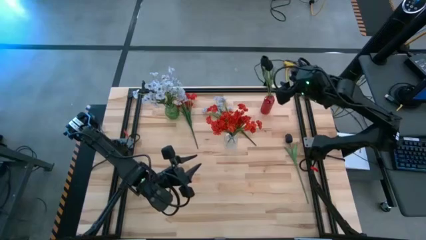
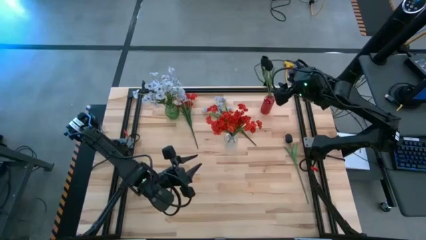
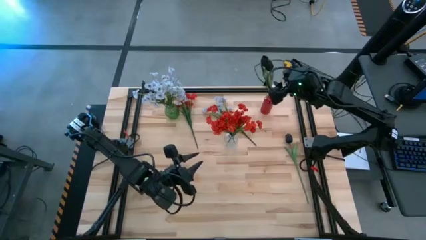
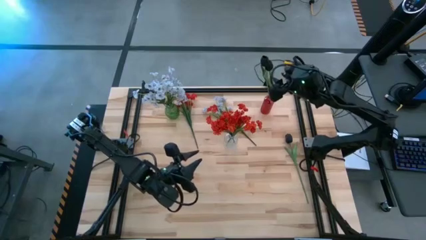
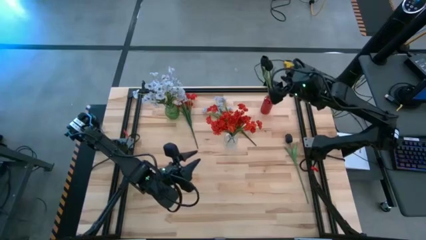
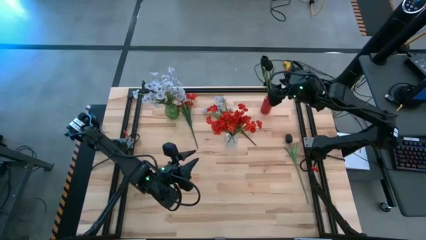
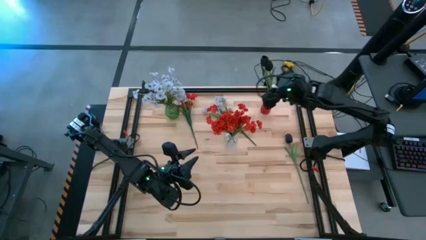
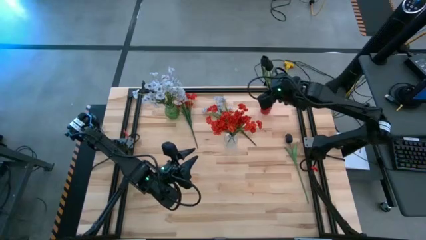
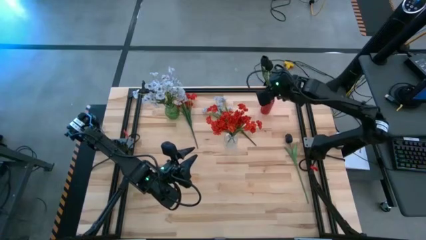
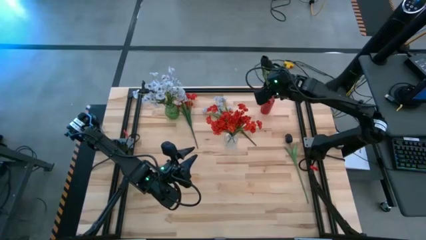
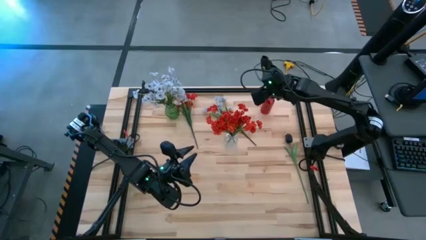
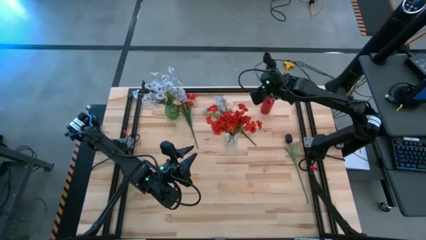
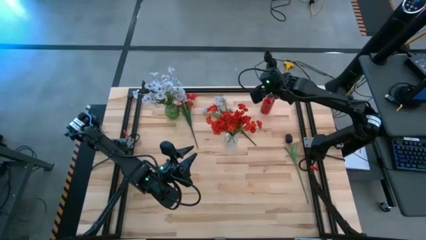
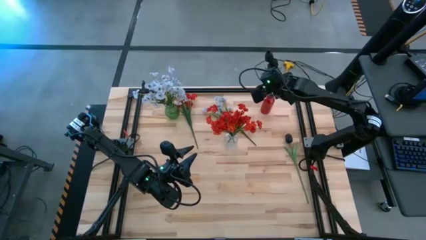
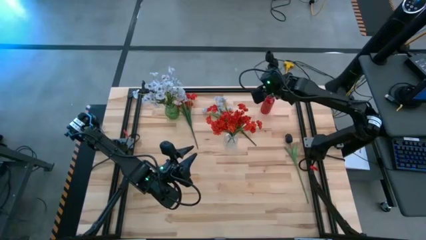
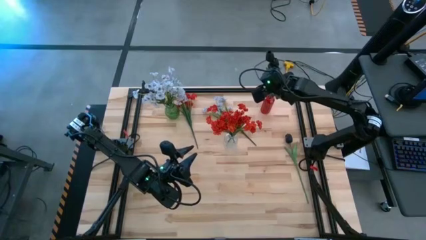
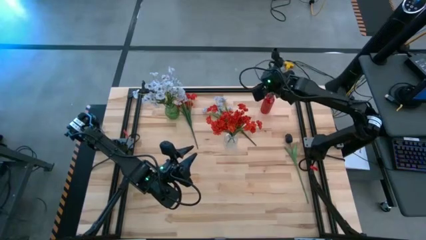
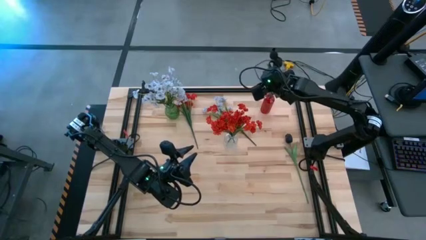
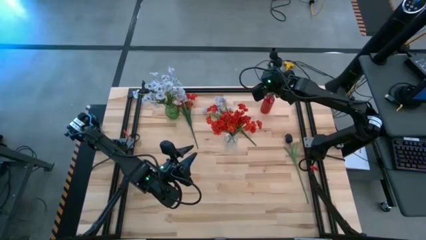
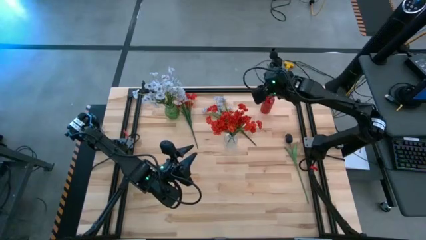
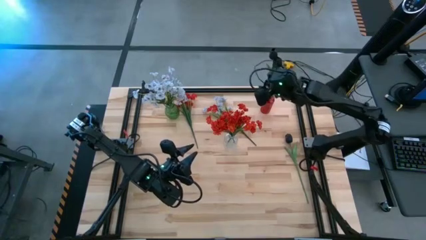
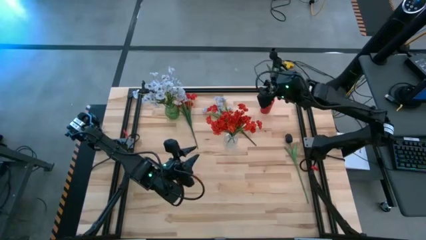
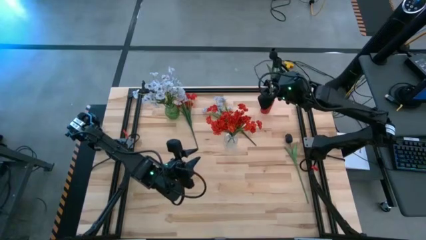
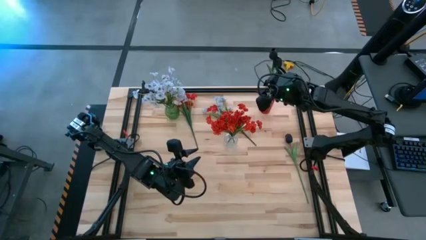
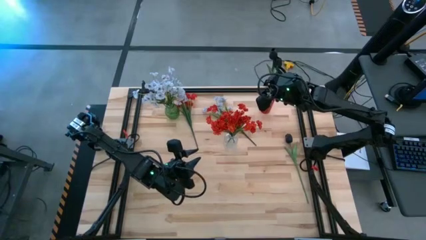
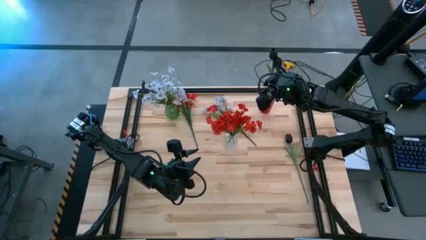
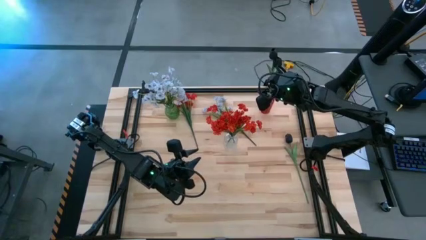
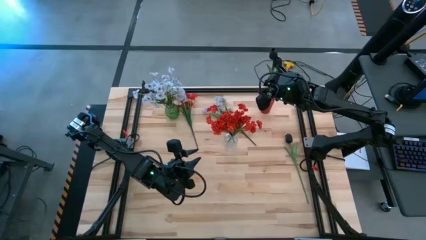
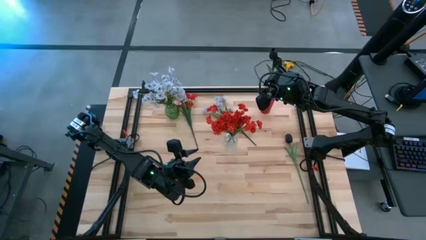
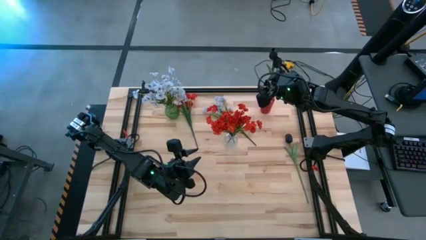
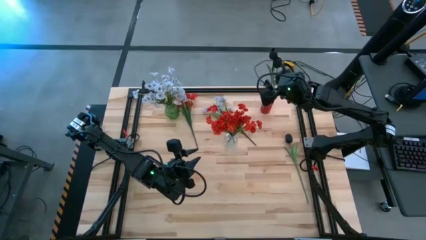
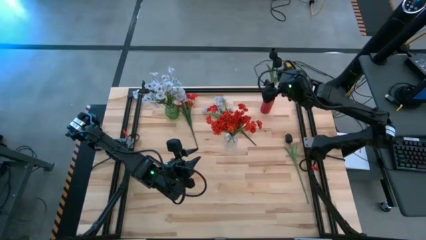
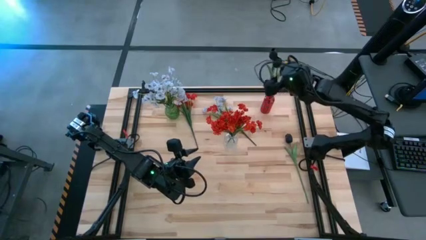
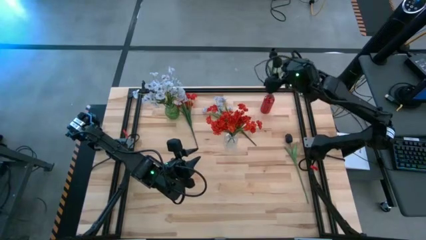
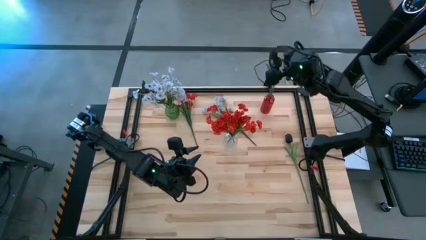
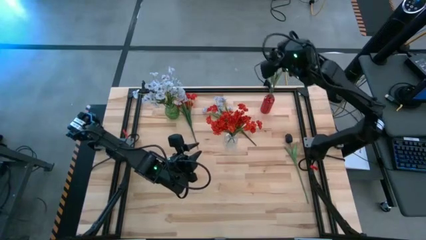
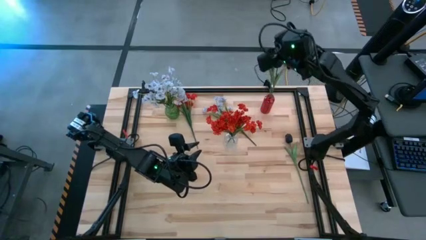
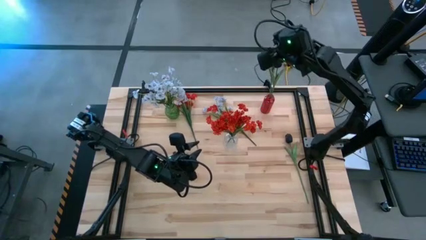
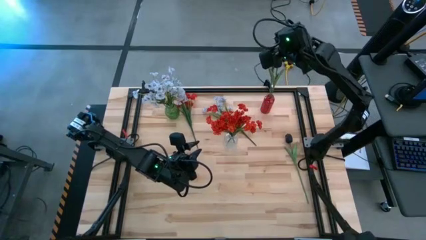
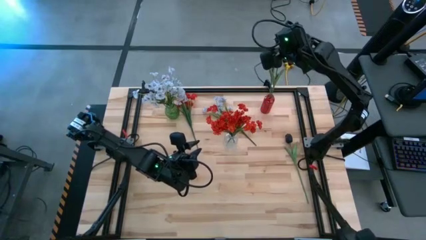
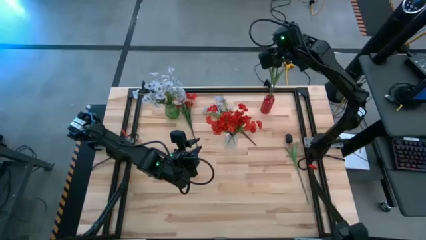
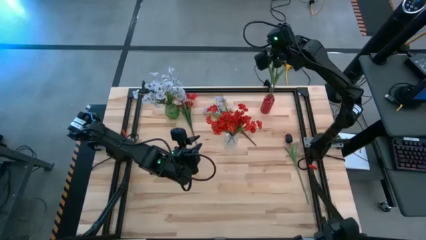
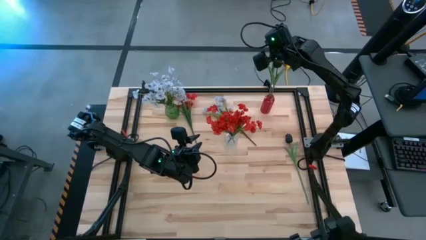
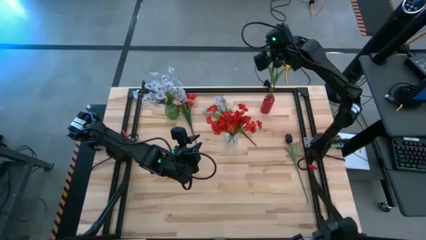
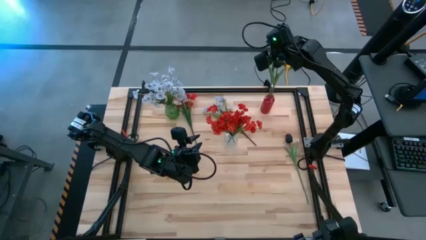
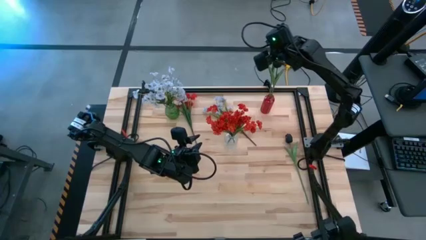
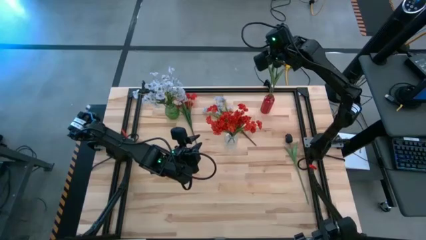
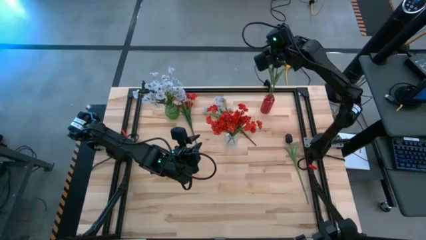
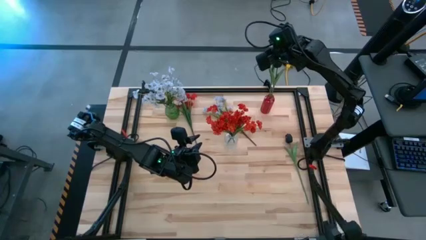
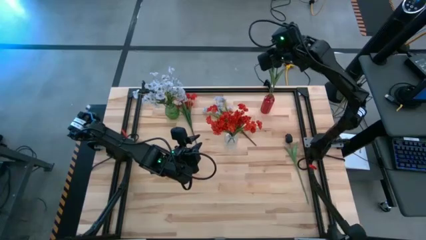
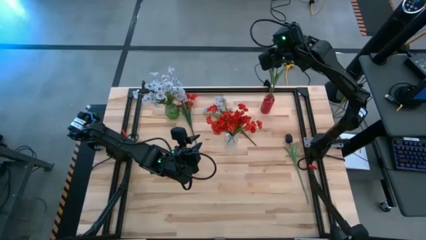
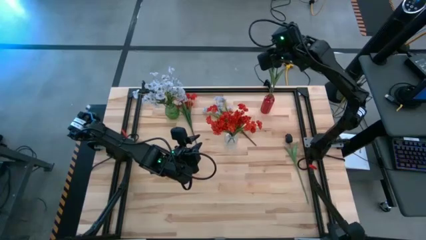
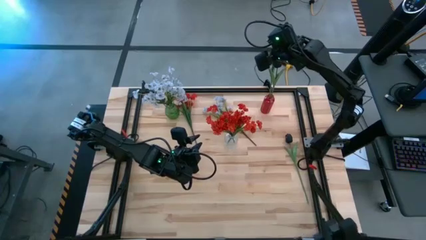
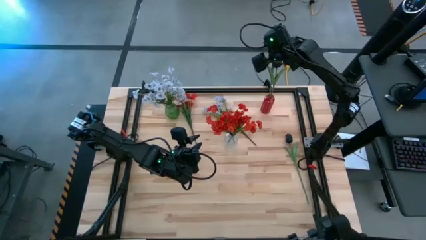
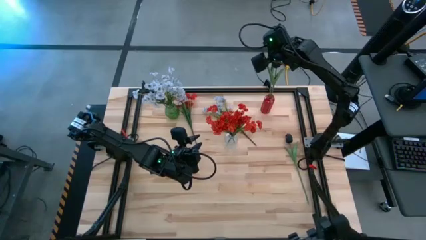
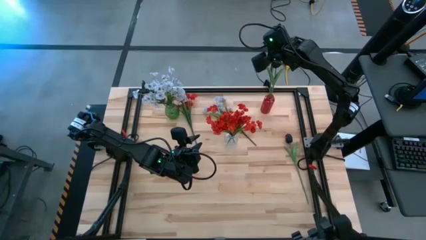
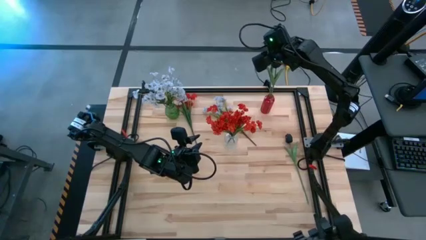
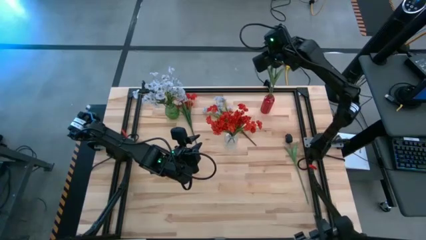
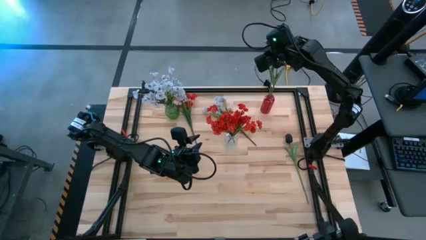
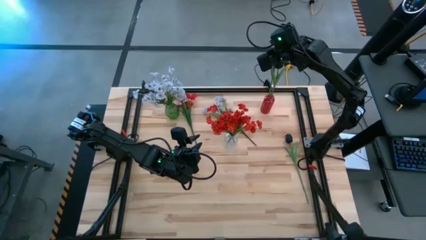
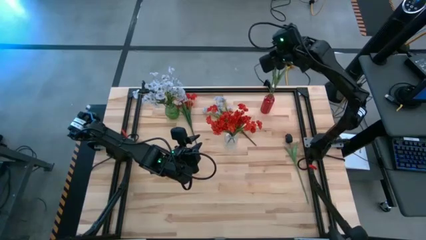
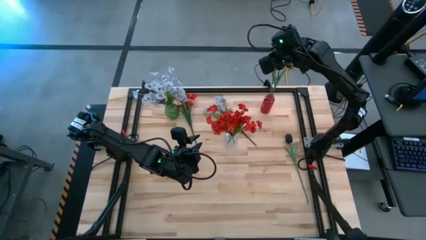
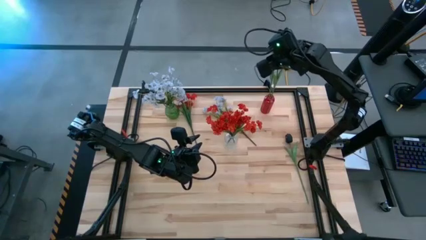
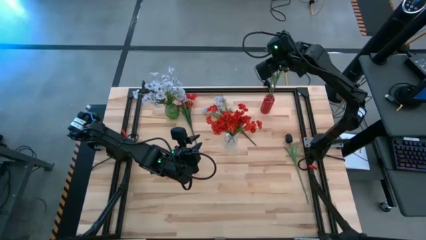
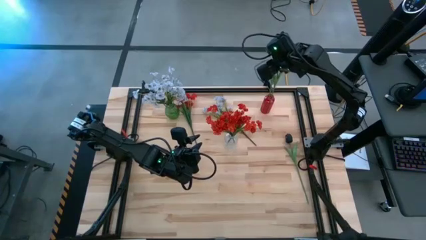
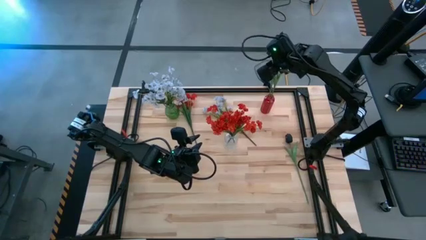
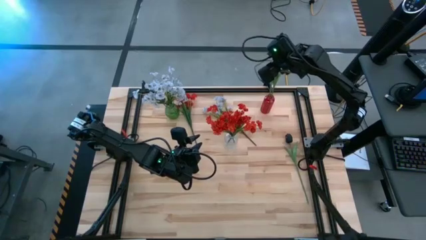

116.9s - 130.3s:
Task: Sort flowers into vase by color
Put the left black flower into the red vase
